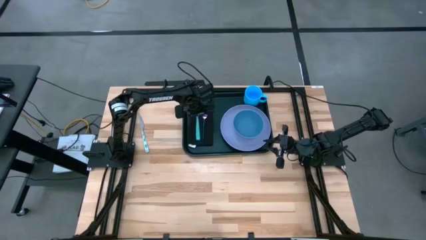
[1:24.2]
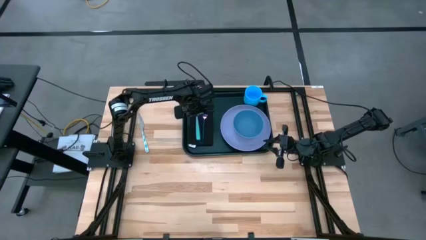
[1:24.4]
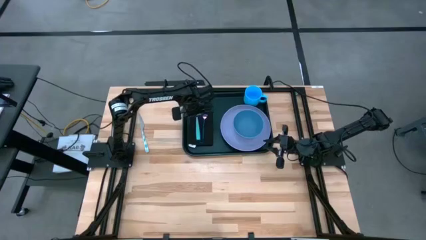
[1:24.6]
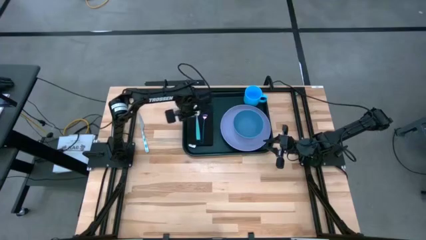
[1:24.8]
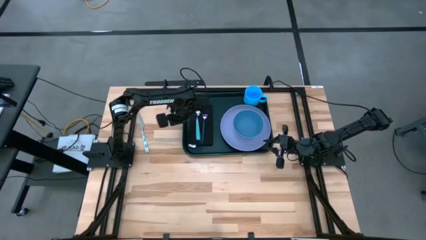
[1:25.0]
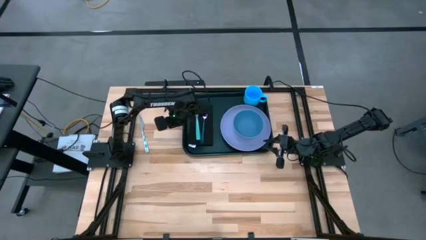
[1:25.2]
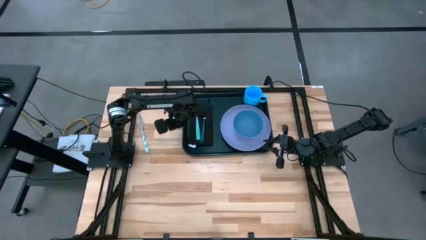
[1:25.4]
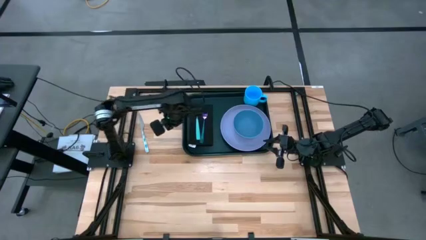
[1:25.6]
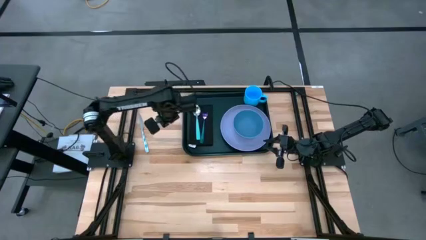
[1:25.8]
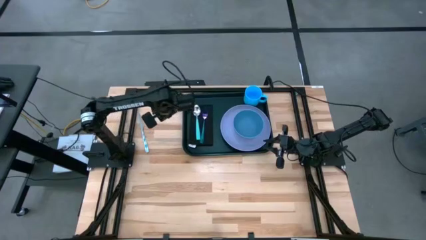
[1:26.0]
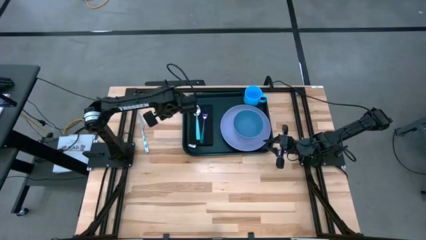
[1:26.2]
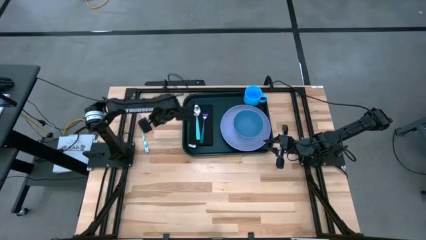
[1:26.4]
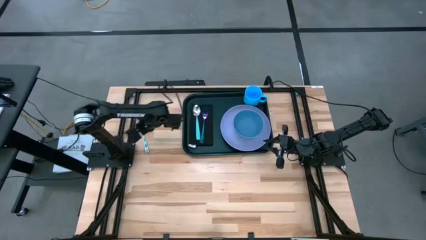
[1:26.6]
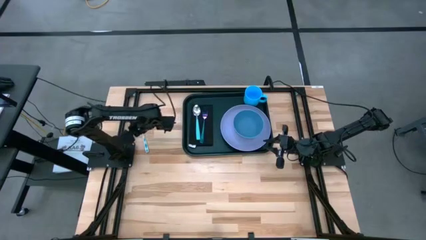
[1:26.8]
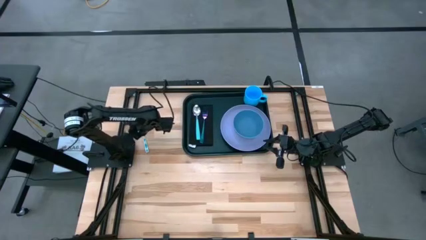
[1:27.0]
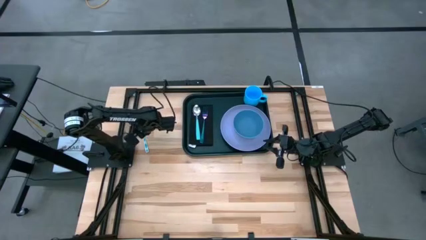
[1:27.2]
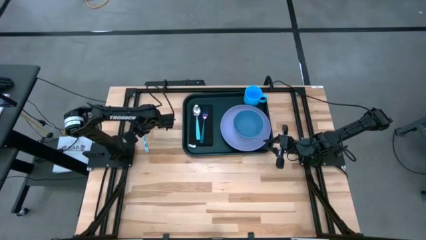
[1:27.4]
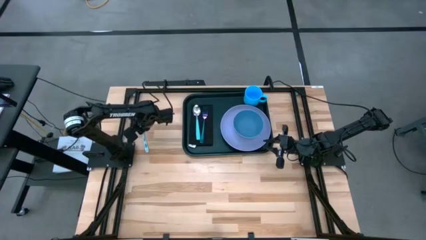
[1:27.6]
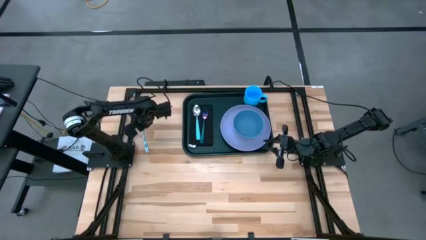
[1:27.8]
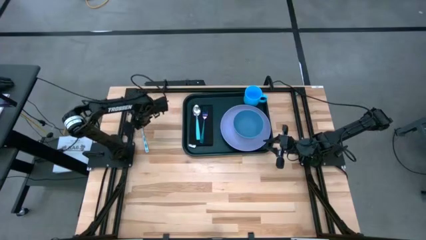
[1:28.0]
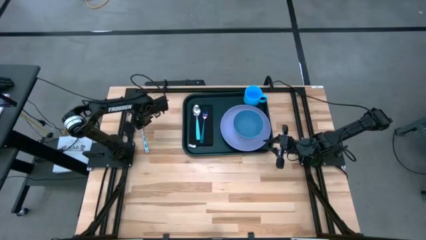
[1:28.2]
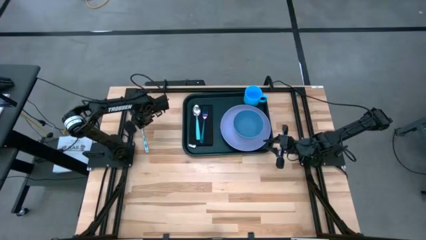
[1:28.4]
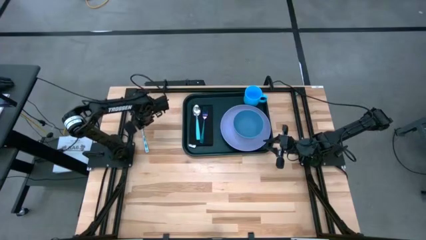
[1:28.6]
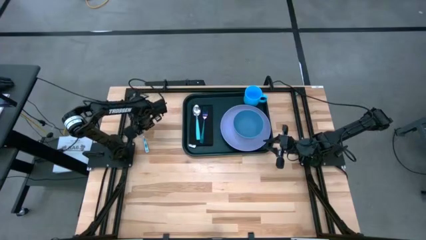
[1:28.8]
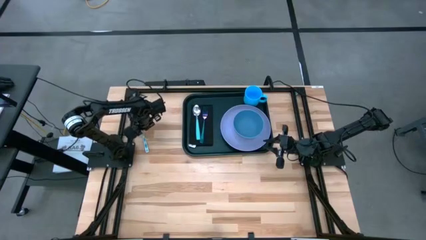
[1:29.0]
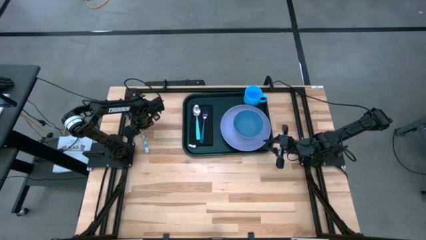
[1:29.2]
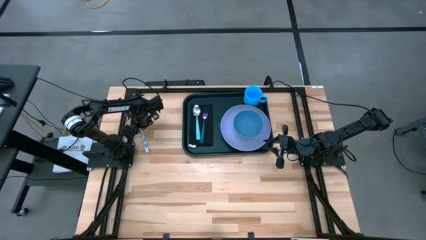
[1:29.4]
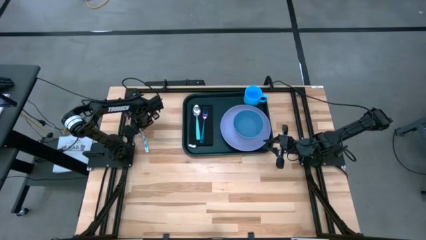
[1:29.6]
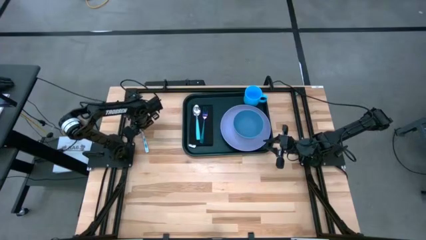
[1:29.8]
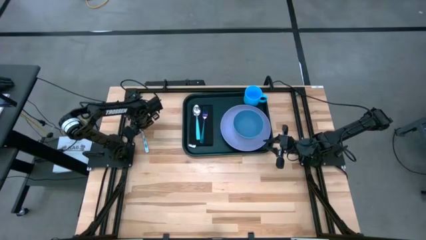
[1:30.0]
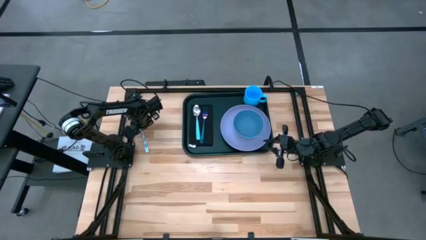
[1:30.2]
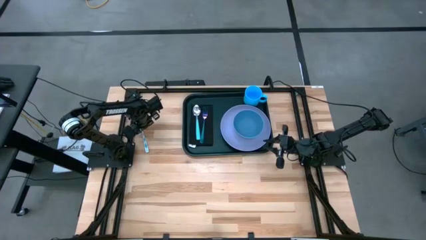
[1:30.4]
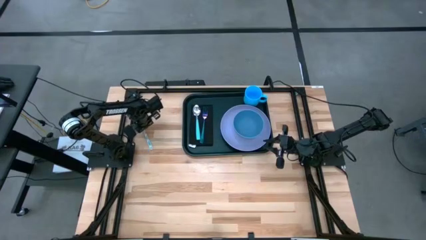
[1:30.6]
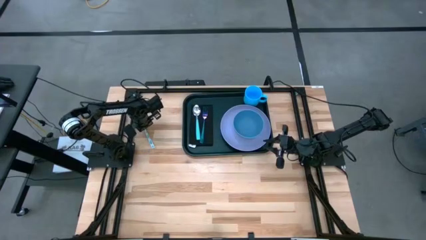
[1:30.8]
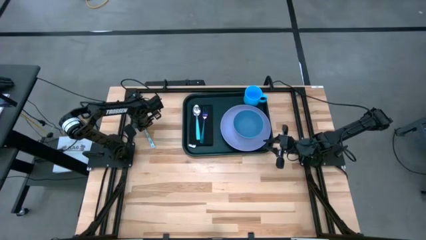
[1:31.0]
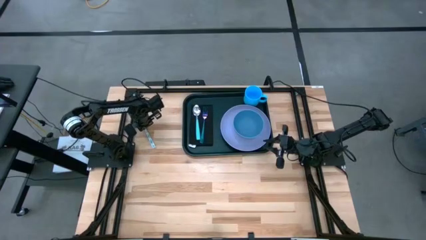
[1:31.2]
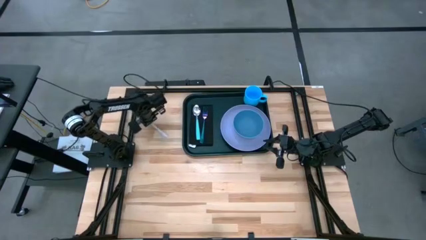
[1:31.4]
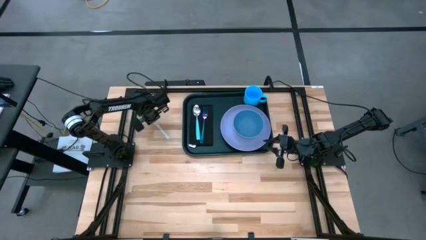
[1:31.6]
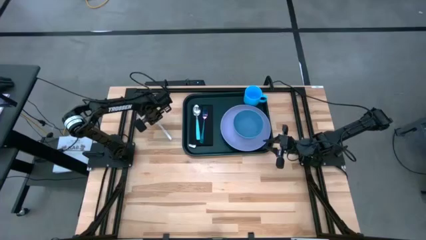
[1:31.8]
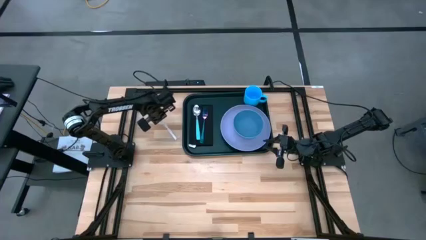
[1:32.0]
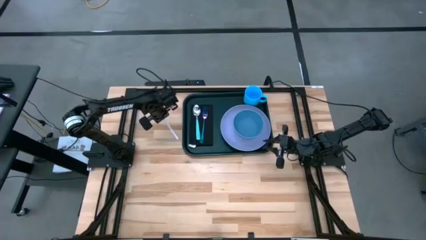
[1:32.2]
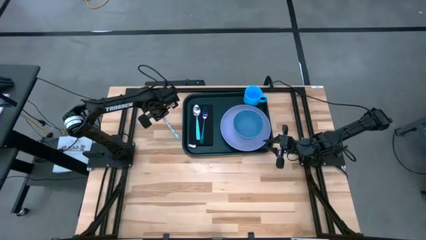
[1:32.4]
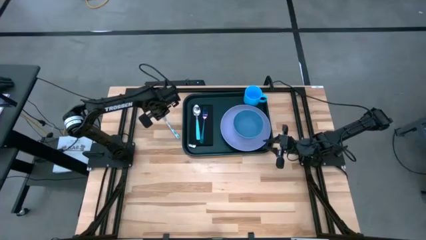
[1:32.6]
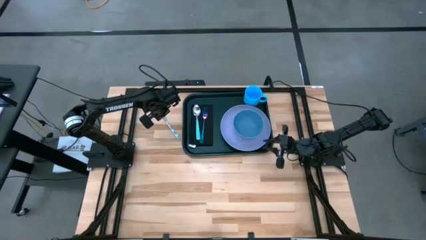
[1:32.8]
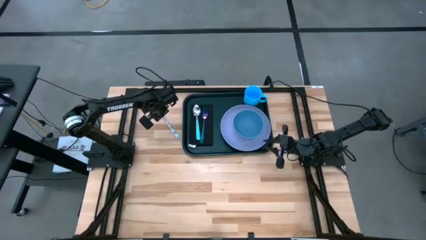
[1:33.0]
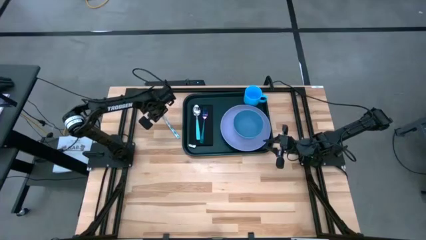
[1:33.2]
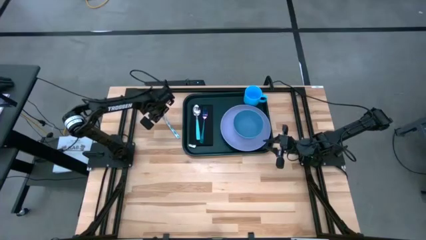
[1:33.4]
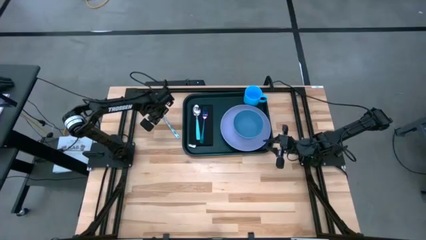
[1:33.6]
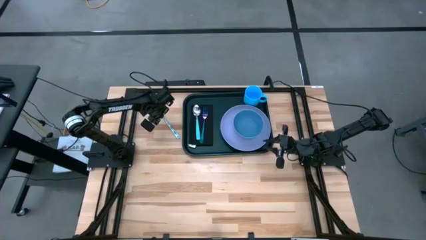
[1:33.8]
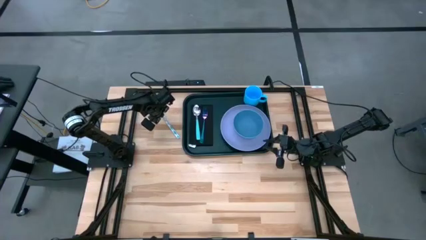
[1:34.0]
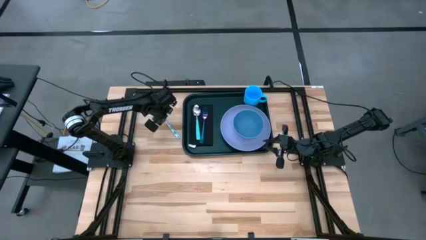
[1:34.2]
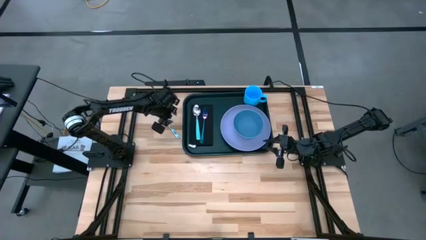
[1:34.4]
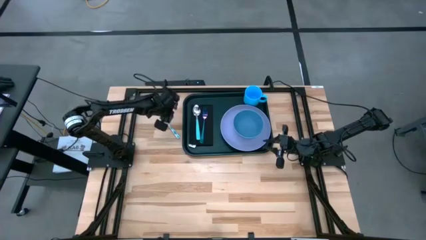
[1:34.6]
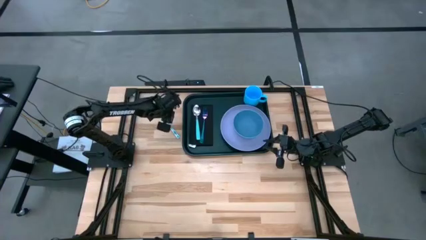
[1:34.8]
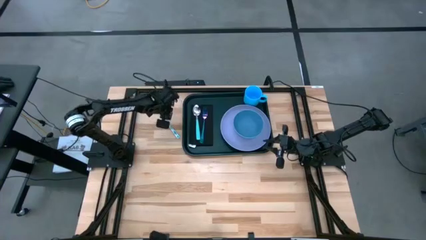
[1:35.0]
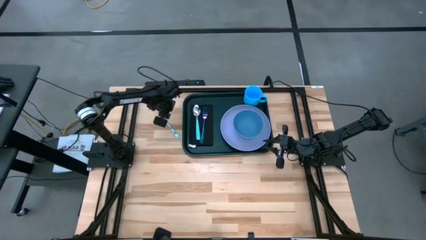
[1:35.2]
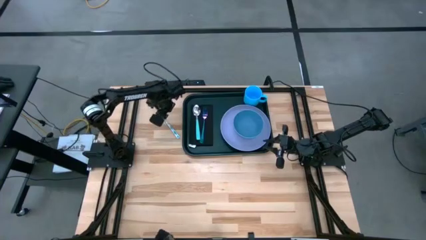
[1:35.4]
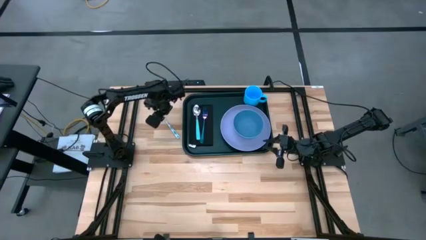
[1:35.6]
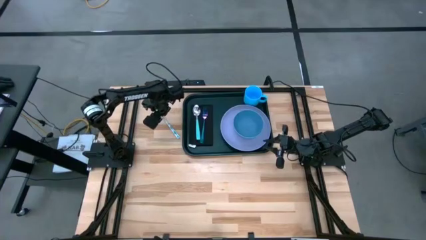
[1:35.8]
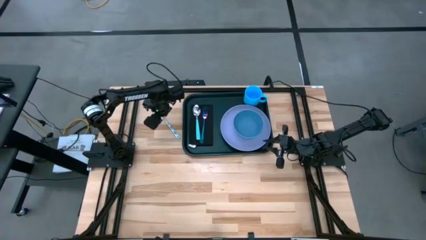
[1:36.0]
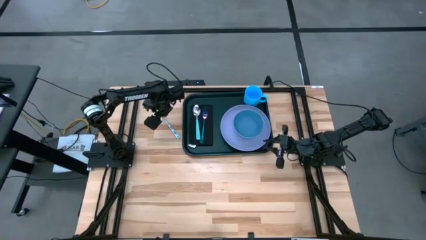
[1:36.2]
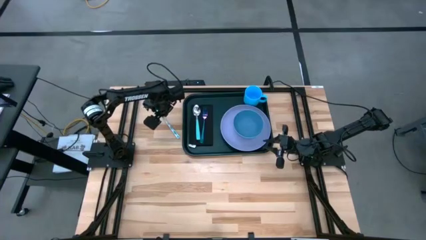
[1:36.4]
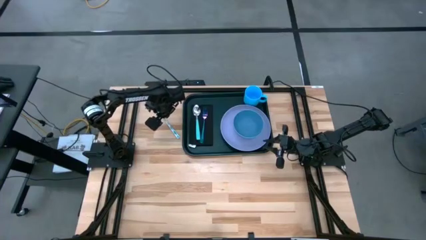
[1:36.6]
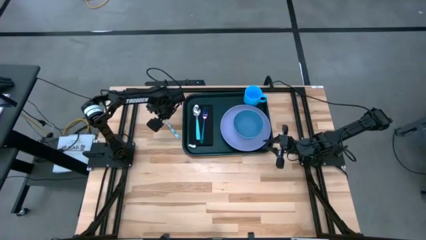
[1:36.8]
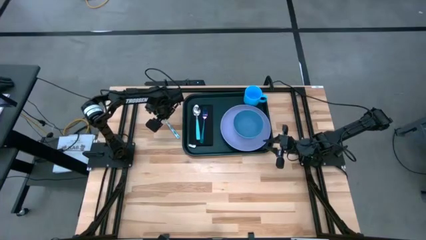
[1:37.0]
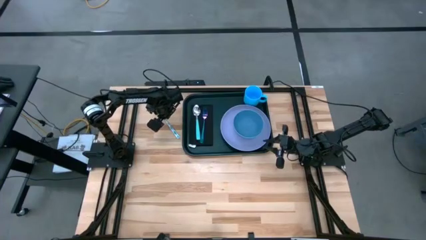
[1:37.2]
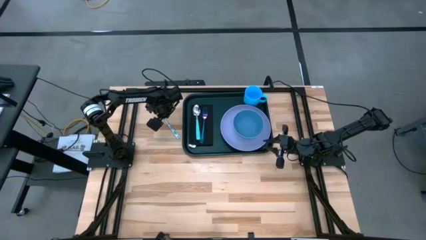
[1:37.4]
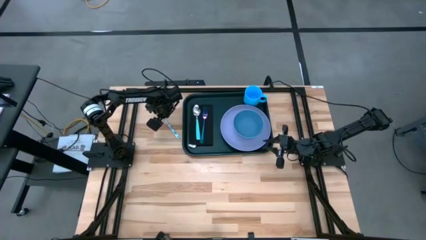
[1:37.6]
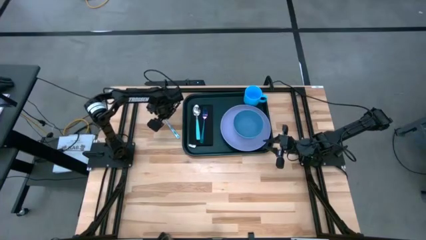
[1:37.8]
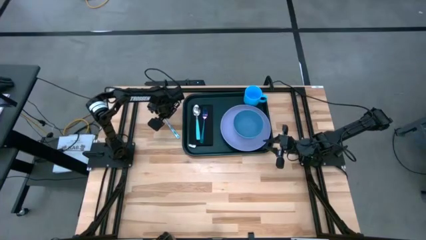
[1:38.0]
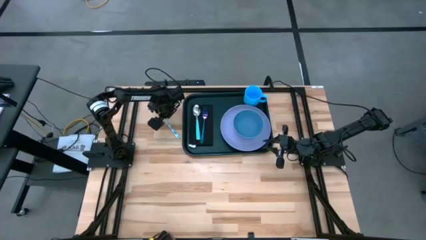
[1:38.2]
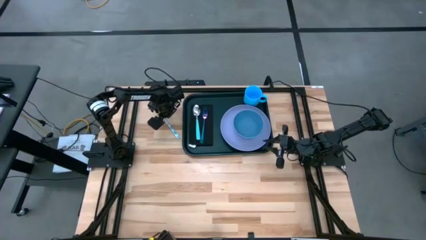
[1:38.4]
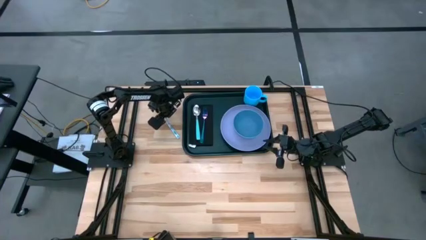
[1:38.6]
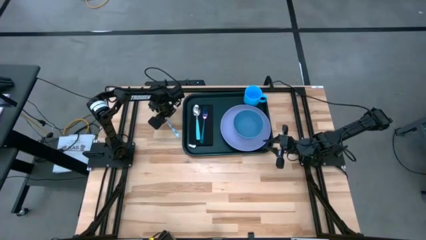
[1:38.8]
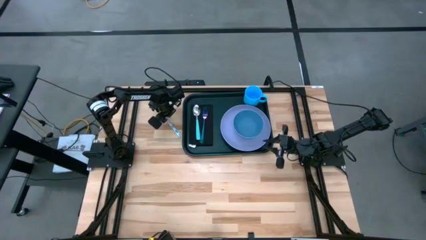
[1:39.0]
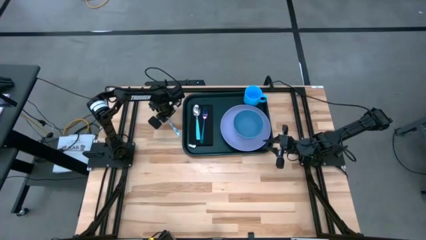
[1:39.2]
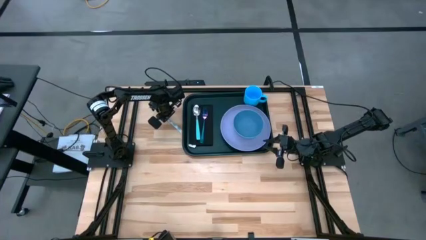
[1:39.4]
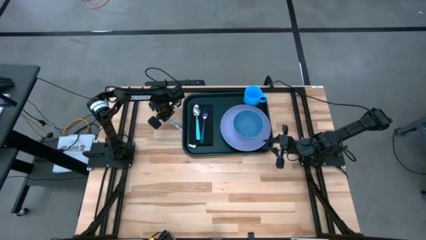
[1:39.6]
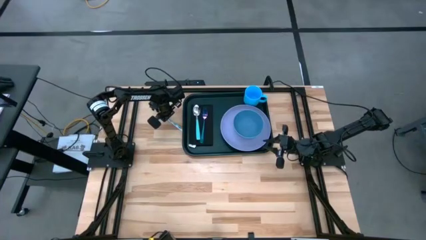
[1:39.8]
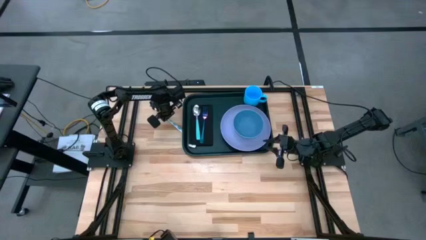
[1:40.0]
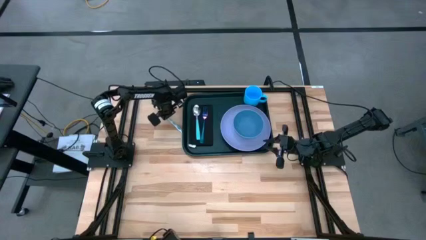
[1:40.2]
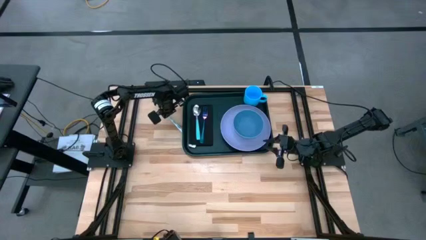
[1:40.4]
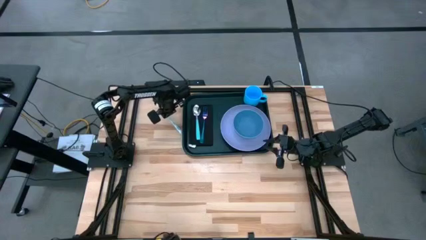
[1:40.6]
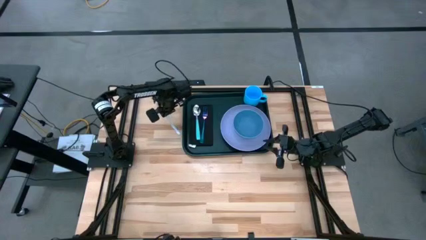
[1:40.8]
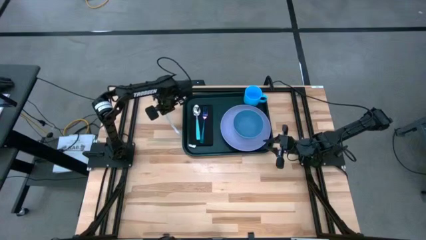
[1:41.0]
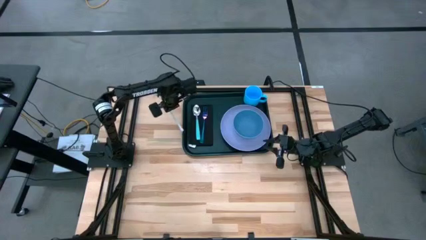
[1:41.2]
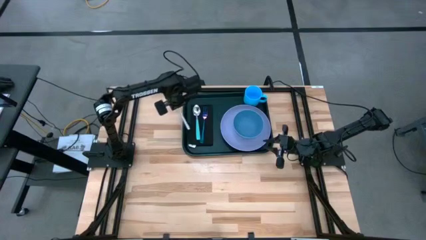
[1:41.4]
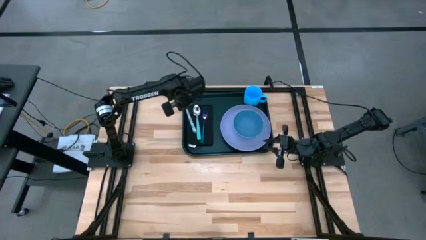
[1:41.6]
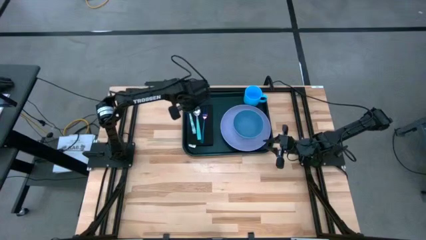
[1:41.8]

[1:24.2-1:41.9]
Task: Set up tray
Put the green knife on the black napkin
